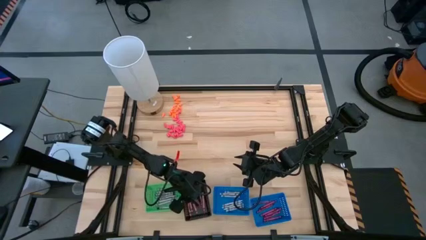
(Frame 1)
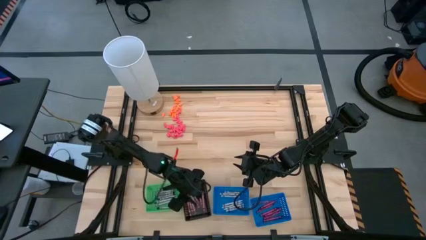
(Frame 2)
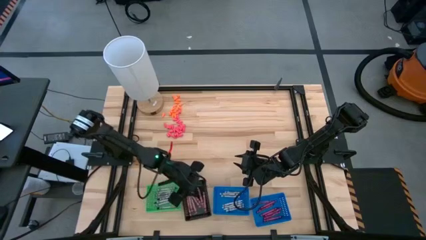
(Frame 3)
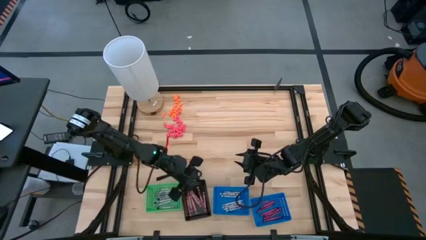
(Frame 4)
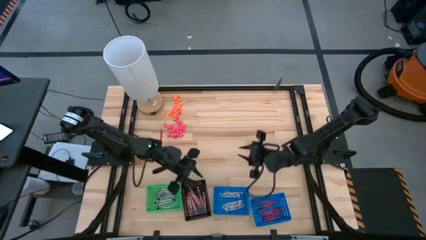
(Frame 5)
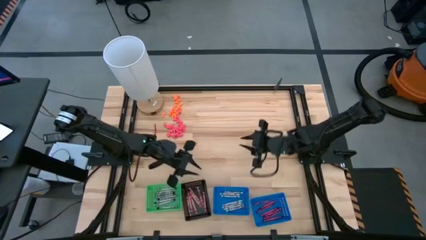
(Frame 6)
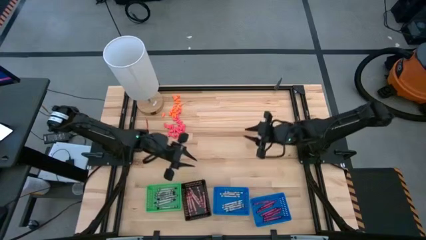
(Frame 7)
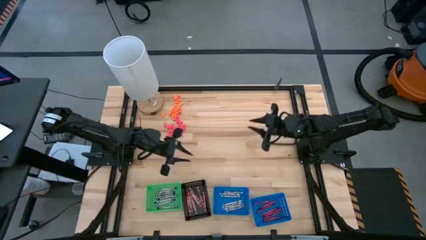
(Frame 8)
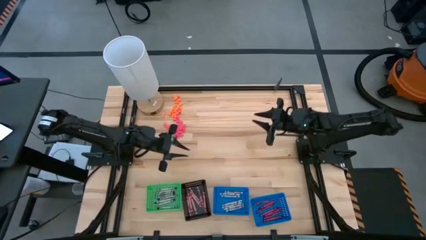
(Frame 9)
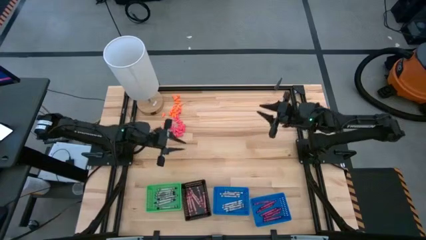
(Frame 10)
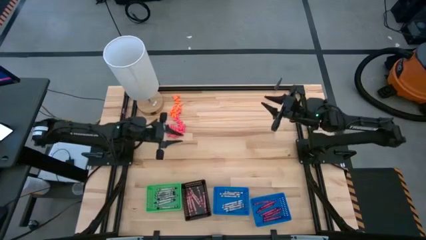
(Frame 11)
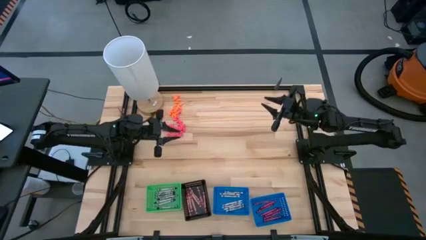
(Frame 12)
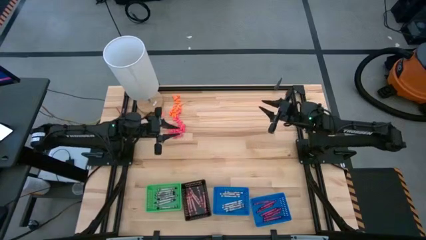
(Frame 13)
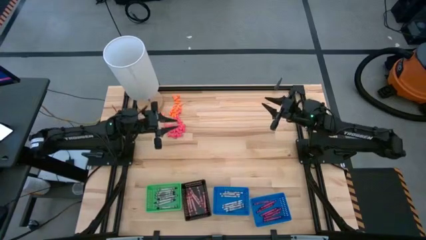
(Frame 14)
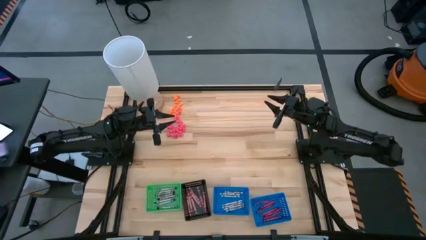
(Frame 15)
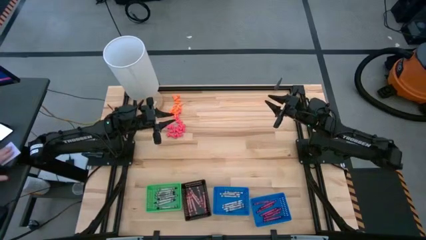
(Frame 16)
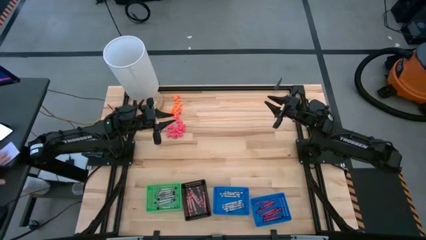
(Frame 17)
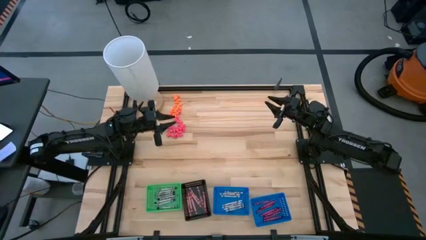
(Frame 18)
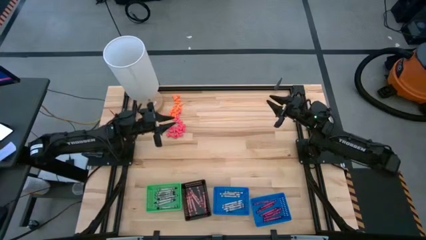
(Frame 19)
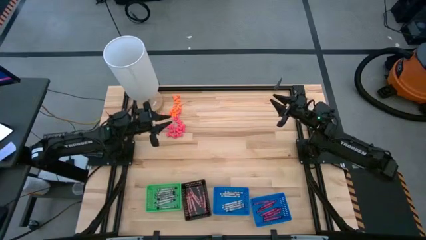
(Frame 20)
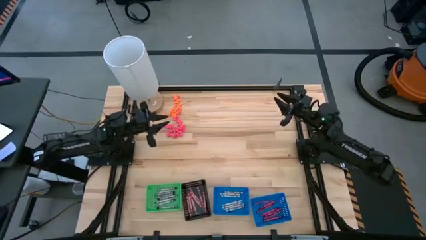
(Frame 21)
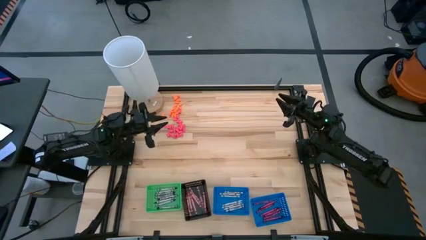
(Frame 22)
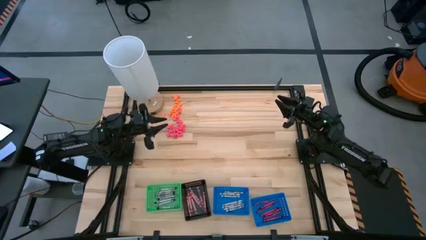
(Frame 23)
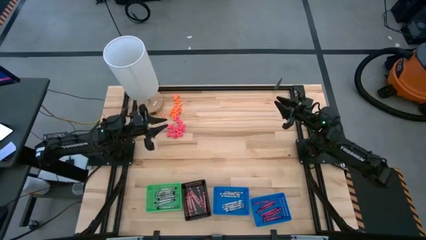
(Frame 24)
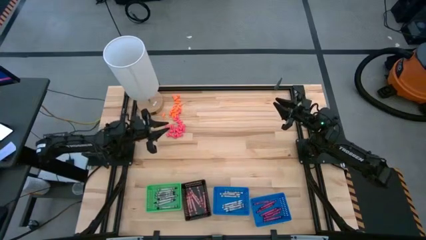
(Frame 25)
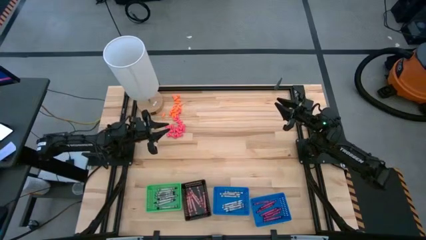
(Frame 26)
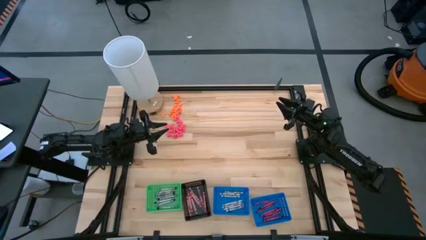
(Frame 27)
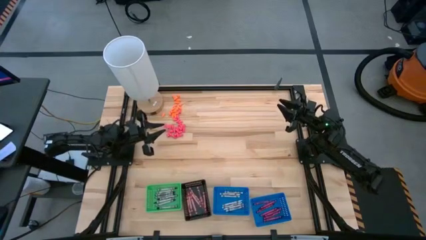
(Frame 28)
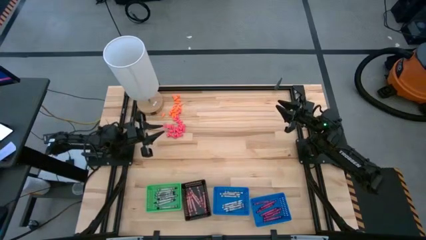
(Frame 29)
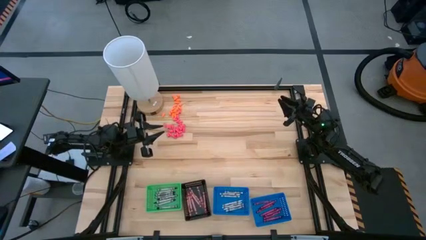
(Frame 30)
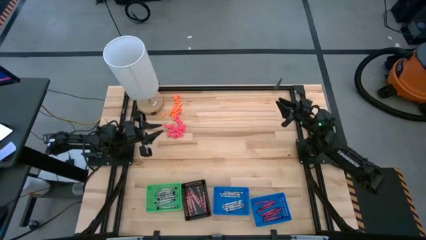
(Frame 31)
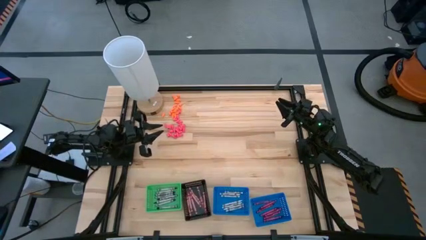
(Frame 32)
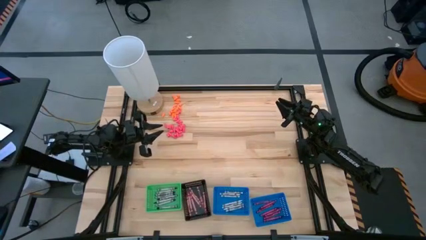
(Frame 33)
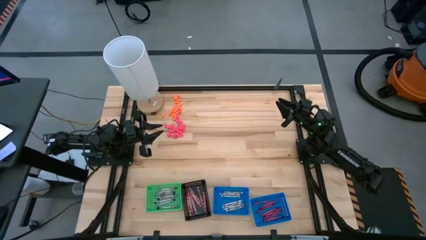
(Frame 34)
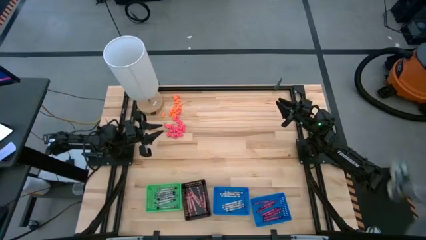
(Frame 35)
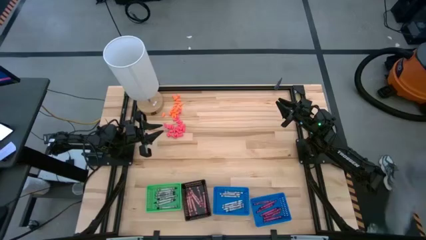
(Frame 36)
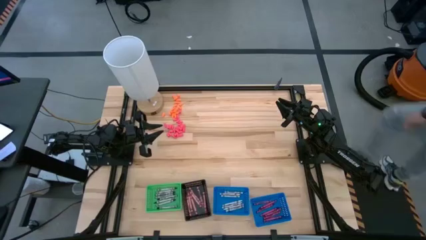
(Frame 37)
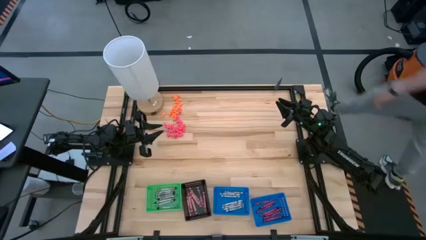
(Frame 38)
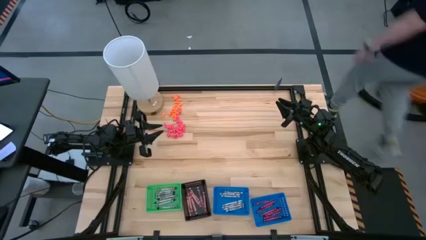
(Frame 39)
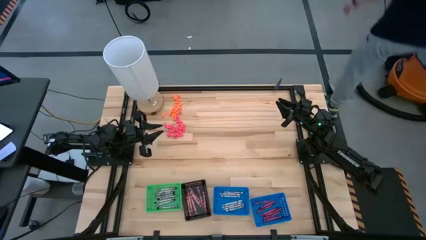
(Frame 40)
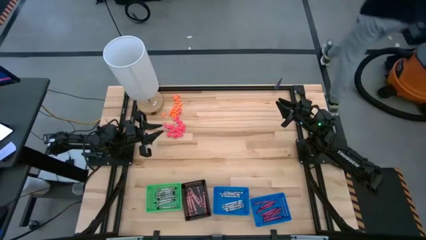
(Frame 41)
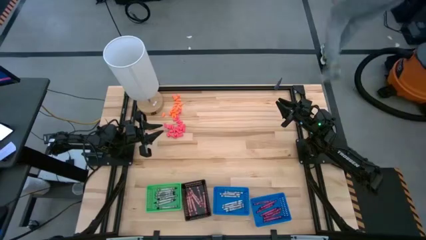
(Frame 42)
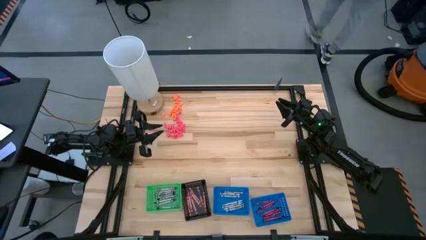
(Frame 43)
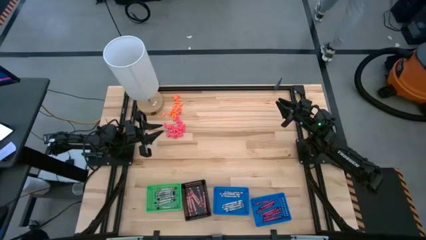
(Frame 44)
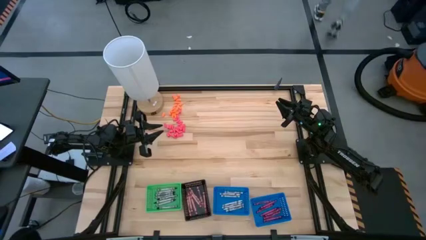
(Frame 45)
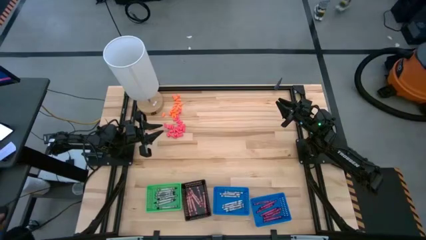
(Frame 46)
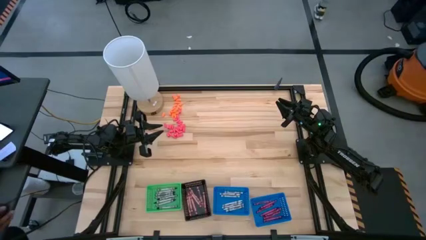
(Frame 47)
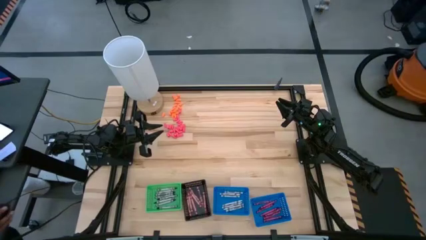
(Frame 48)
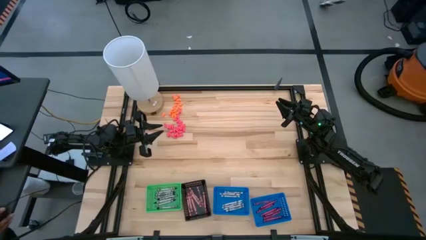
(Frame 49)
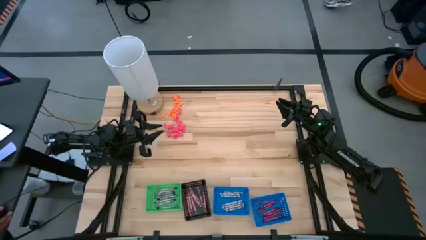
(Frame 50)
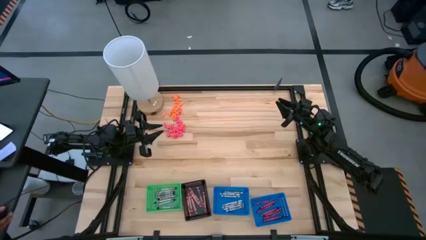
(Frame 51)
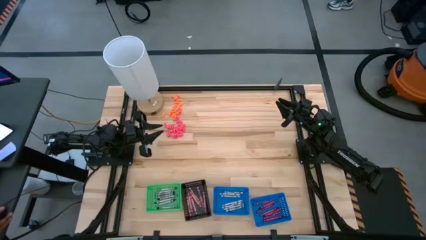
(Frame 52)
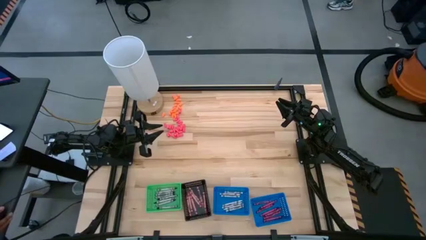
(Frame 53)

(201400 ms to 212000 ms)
Task: Sort crayons
Return to home position
